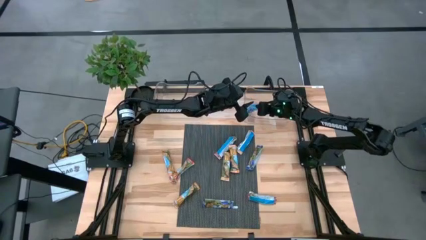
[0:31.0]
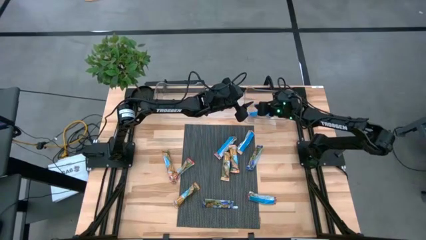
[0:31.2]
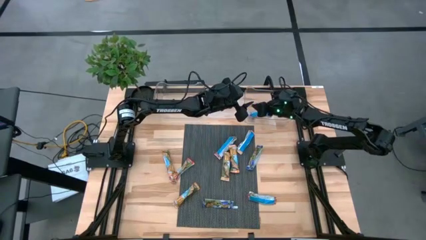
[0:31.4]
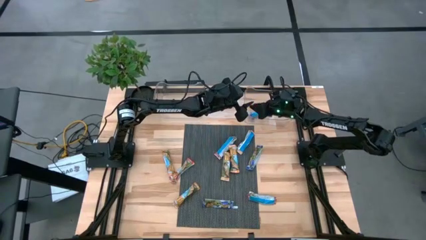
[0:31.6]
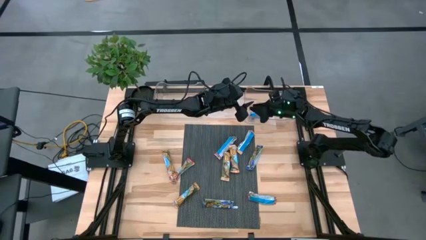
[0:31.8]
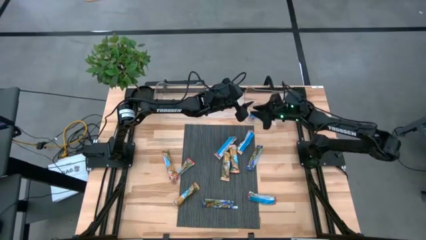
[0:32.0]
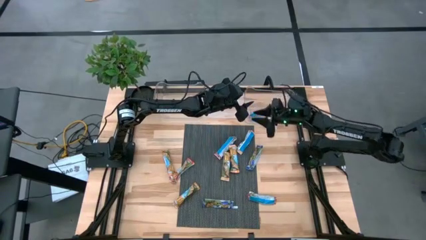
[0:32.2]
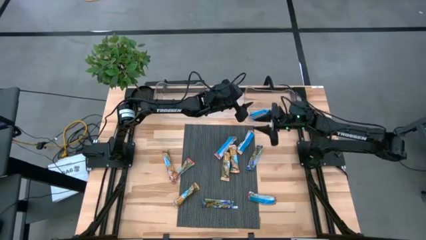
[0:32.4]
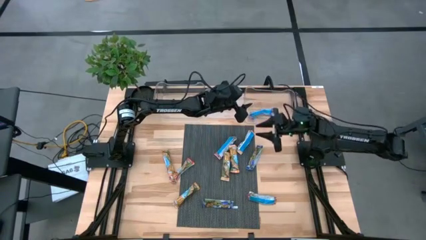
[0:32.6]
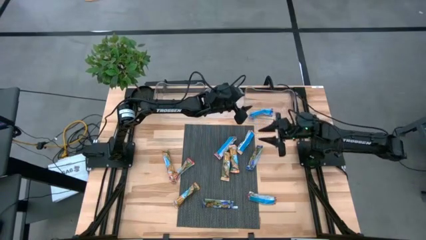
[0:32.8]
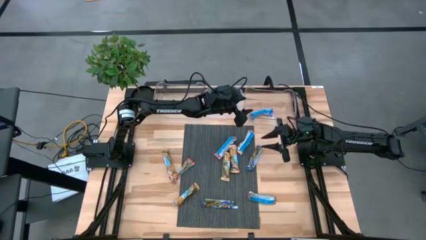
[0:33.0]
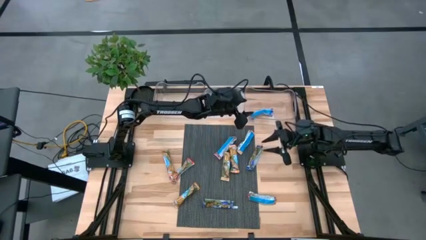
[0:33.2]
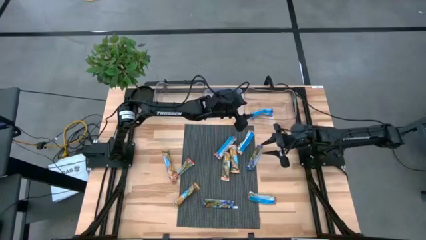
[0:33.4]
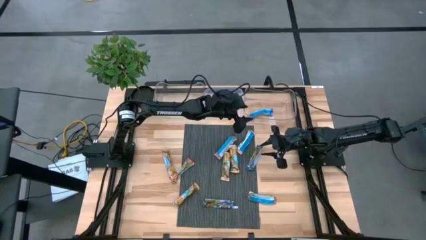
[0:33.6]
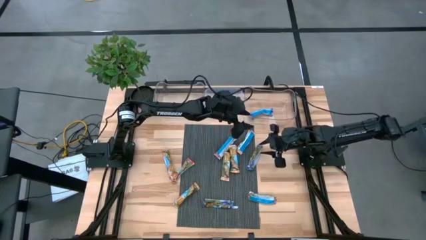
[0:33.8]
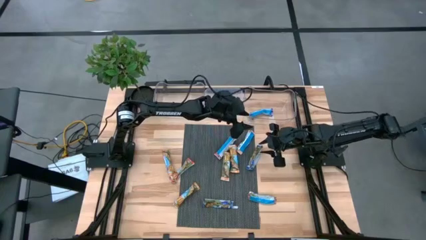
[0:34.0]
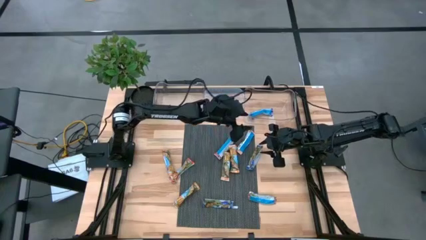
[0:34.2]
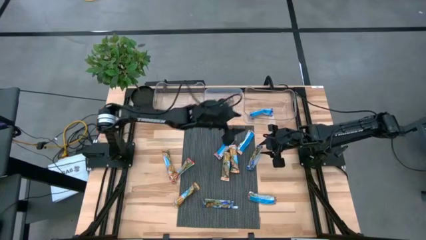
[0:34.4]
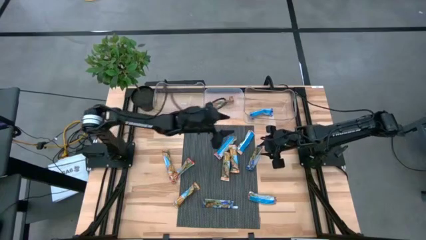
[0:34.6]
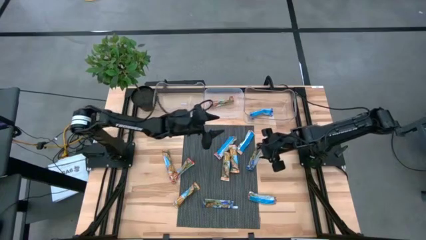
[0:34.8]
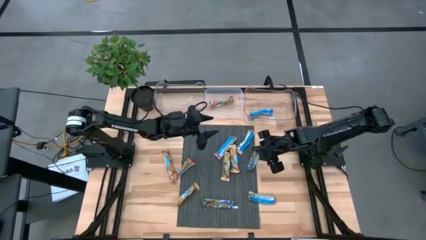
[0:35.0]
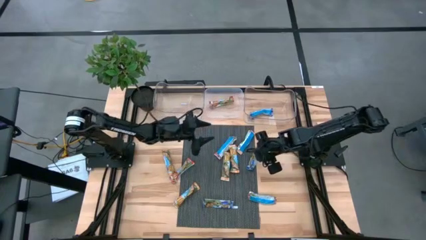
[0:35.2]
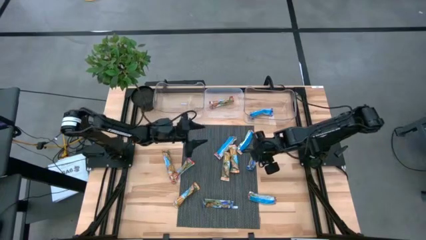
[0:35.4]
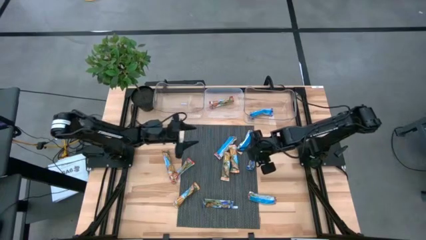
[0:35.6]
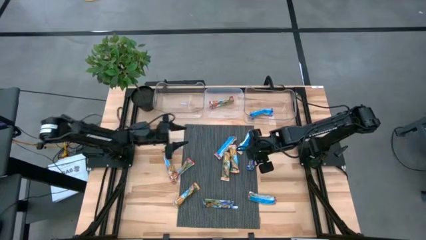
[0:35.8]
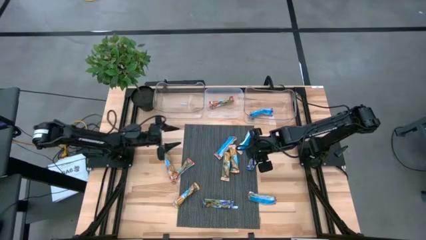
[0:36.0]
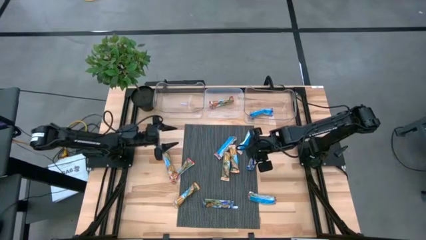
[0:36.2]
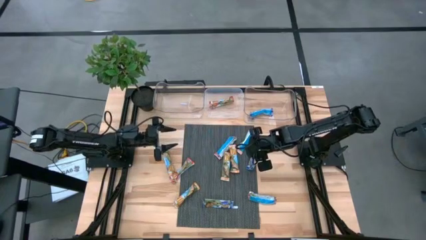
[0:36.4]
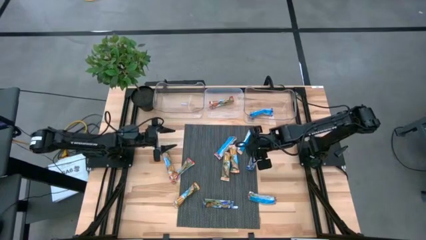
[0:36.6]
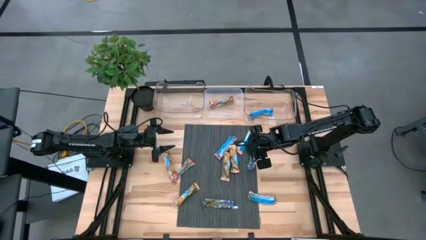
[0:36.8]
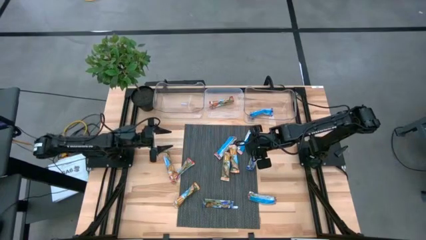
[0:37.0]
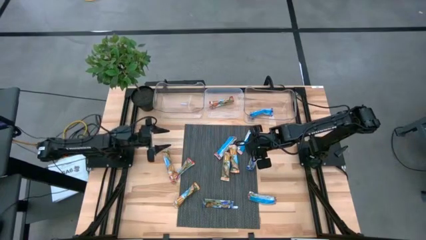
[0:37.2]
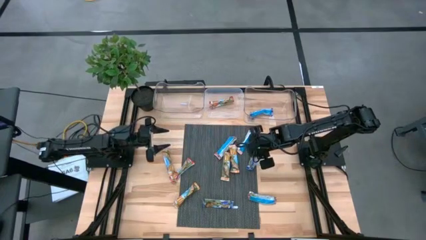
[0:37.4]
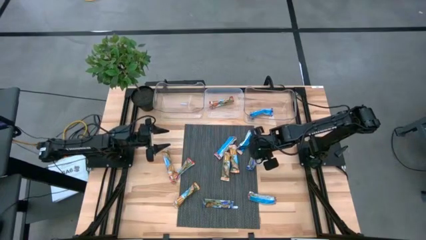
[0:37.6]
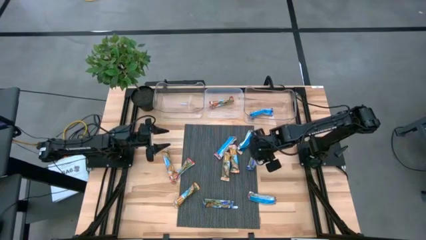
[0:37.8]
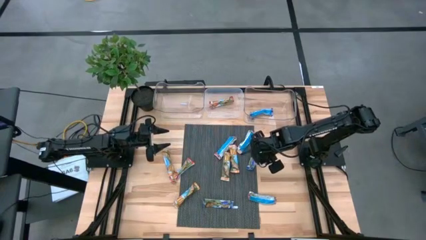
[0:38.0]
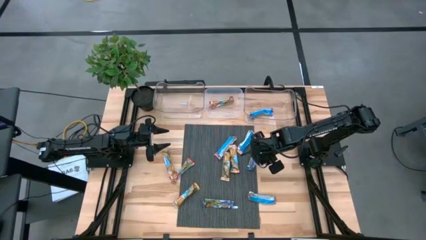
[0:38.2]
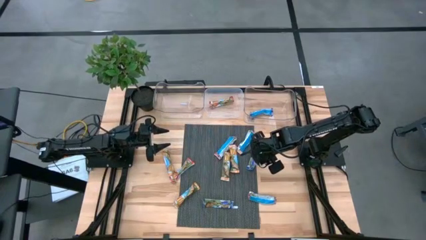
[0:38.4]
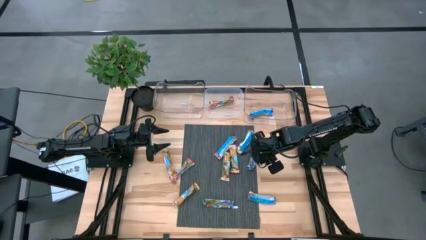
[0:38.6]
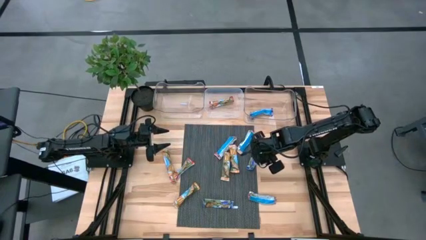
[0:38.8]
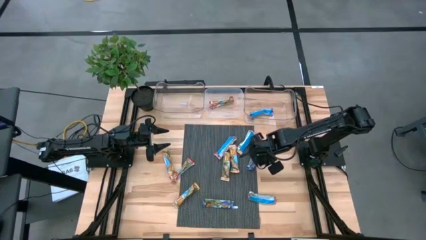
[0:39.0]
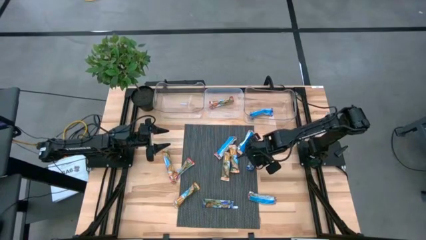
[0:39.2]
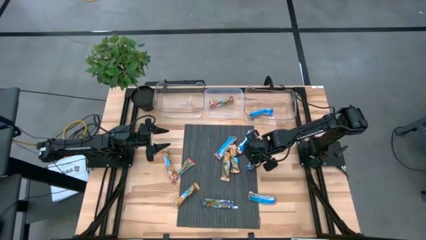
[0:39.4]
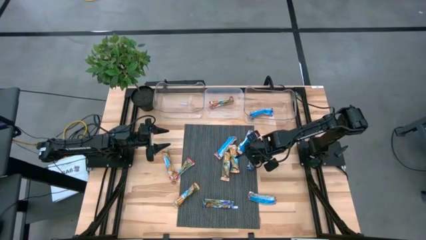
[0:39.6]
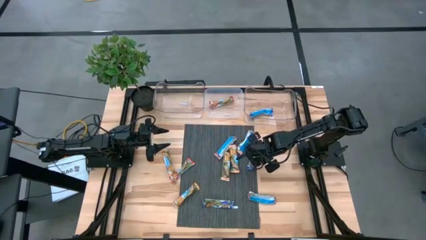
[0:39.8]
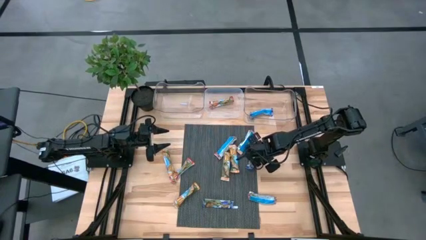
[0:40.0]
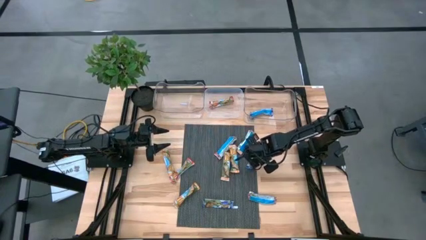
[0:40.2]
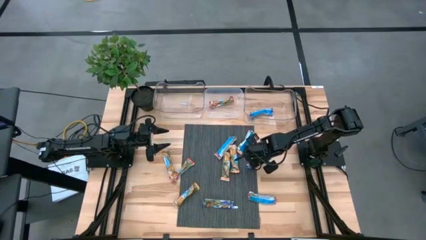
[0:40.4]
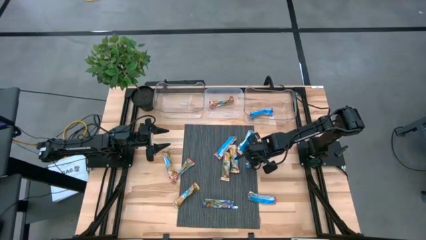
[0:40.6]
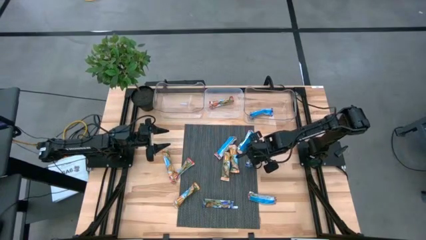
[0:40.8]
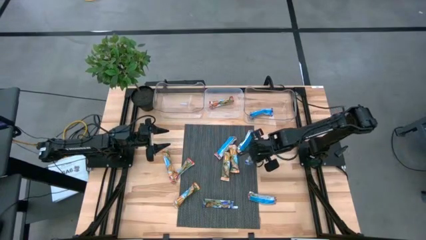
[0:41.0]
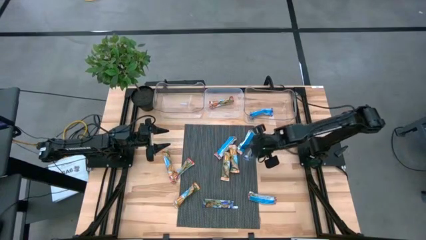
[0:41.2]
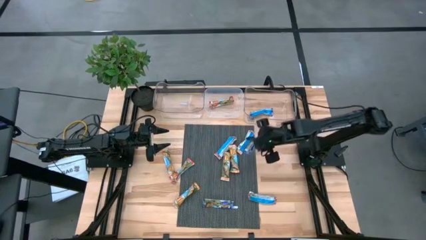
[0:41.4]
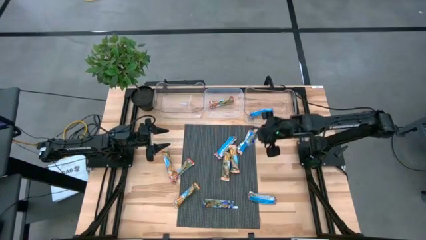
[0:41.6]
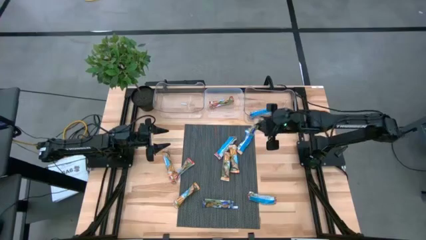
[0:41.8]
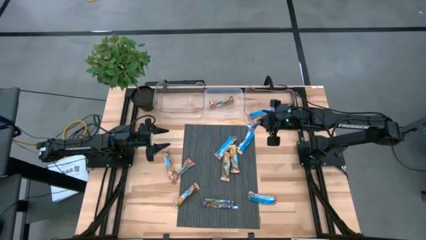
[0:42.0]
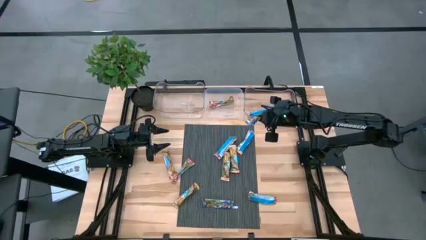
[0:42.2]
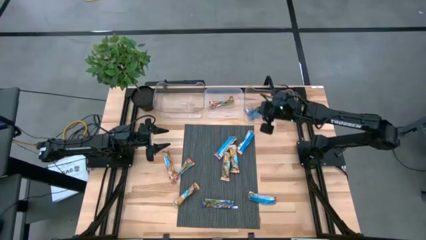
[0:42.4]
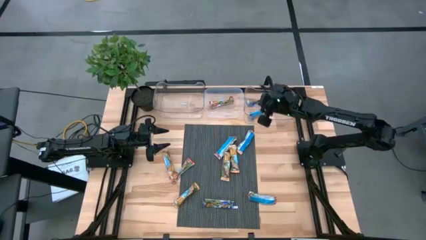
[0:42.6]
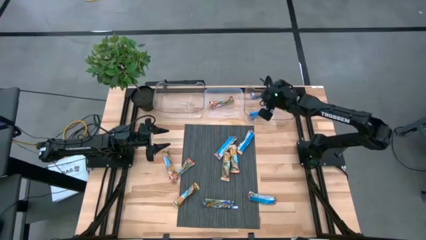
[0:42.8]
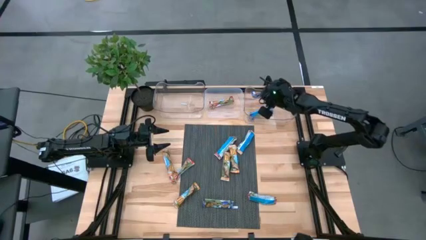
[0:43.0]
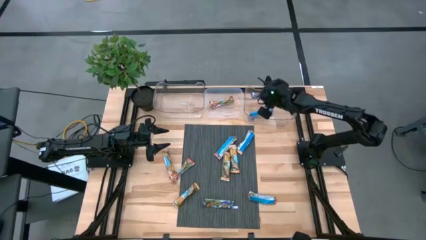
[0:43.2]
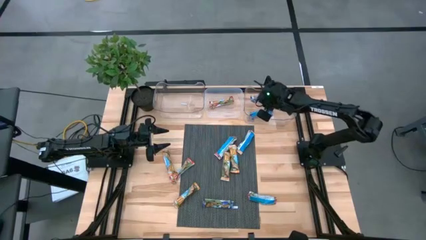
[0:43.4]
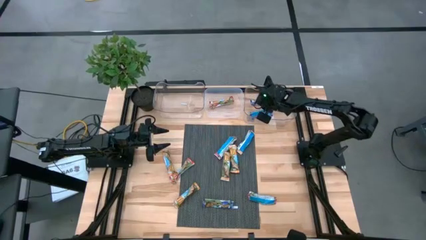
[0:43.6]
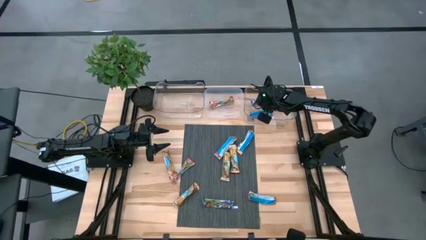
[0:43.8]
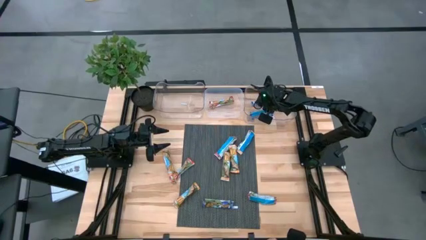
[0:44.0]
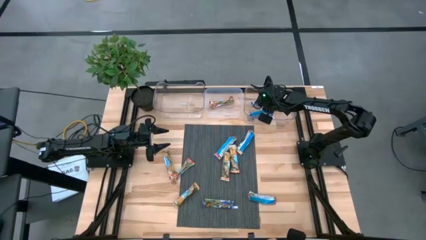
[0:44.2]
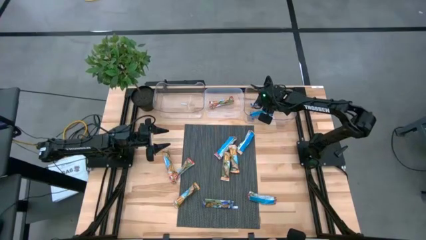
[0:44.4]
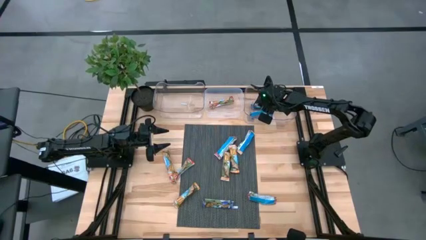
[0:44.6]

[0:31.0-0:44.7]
Task: Pick and place Granola Bars by type
Put the top blue granola bar into the right transparent bin

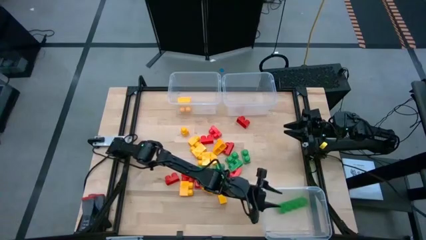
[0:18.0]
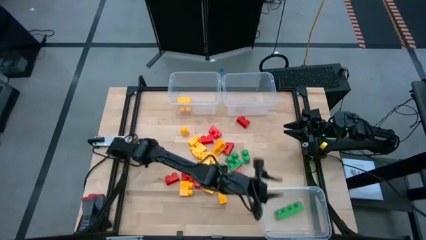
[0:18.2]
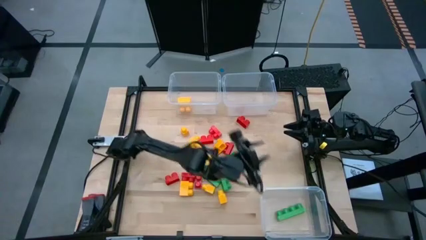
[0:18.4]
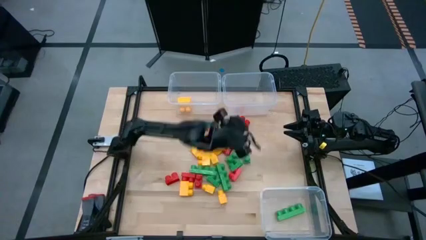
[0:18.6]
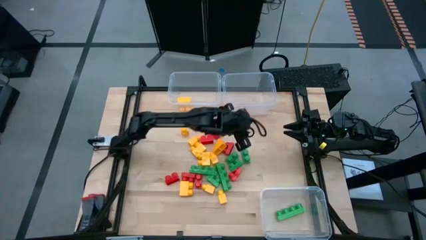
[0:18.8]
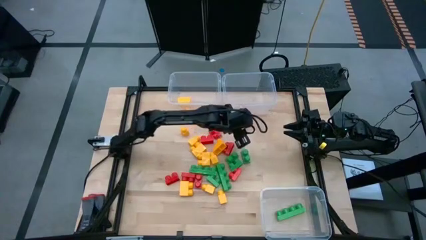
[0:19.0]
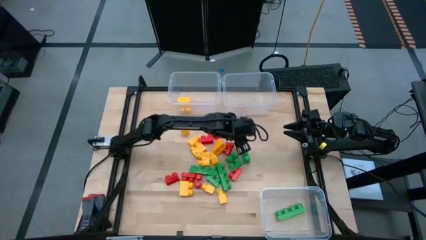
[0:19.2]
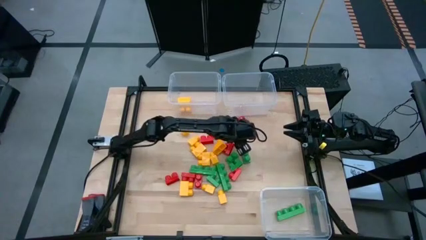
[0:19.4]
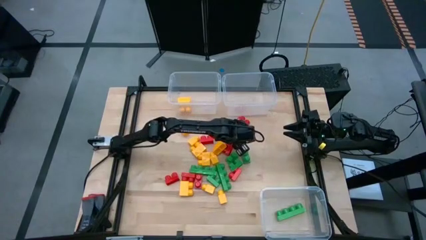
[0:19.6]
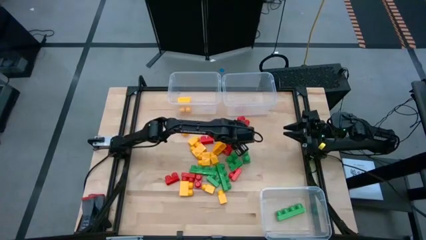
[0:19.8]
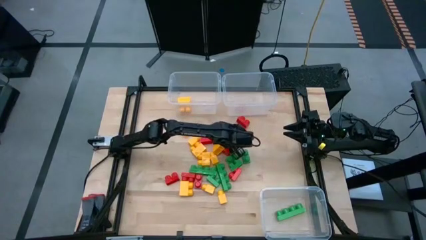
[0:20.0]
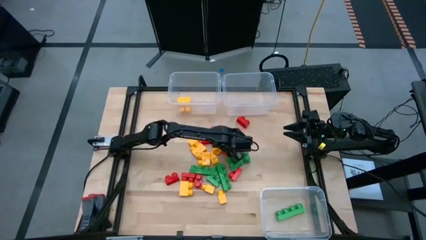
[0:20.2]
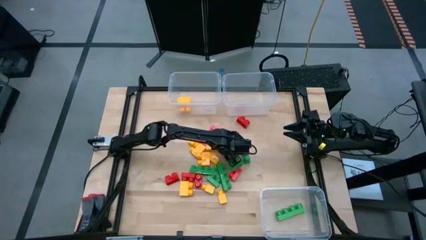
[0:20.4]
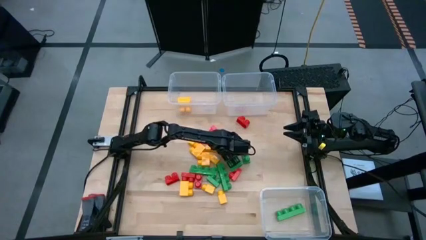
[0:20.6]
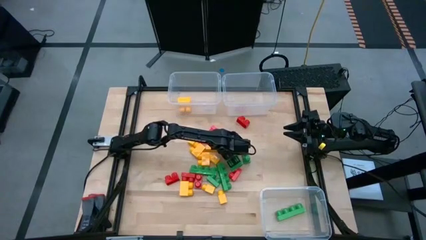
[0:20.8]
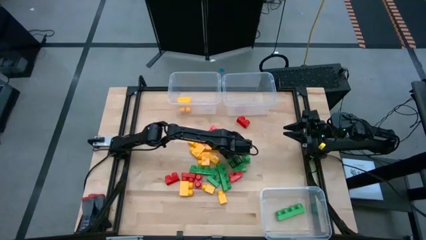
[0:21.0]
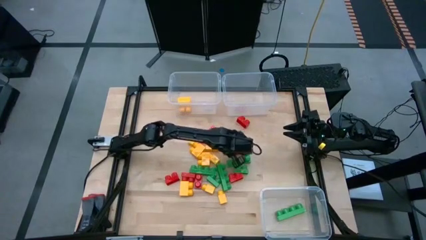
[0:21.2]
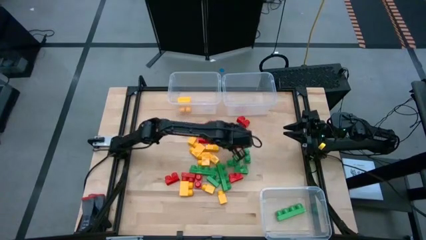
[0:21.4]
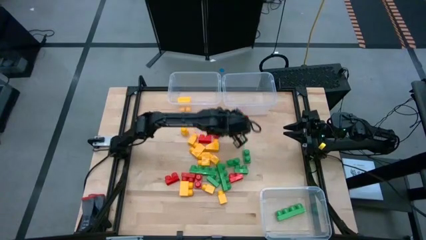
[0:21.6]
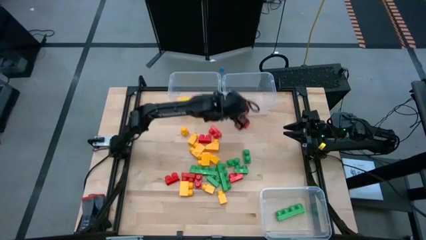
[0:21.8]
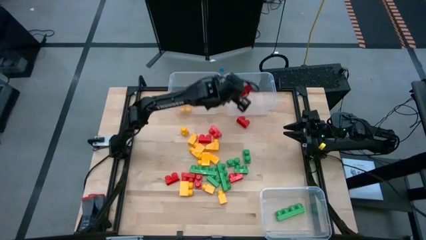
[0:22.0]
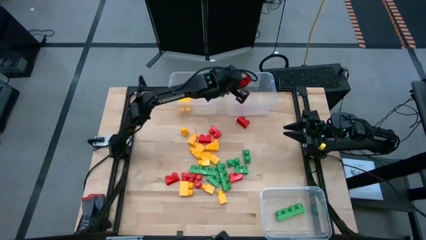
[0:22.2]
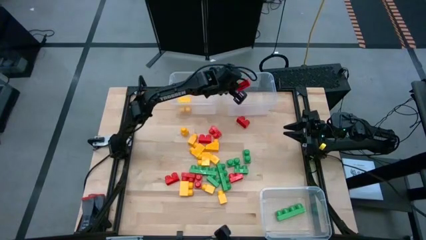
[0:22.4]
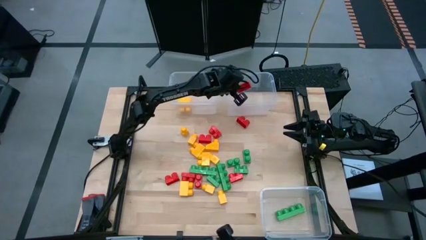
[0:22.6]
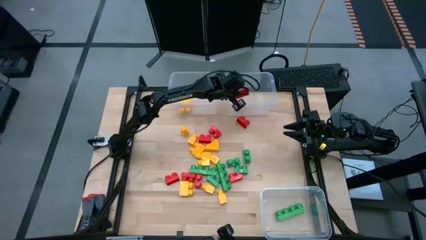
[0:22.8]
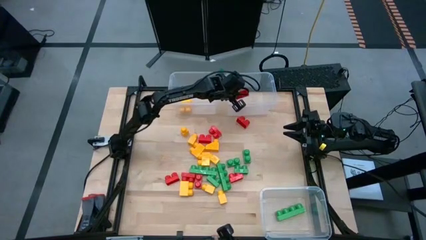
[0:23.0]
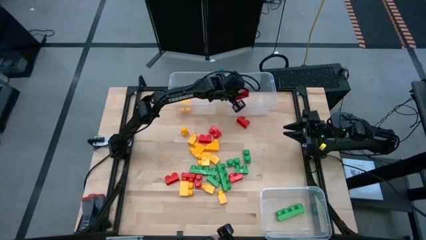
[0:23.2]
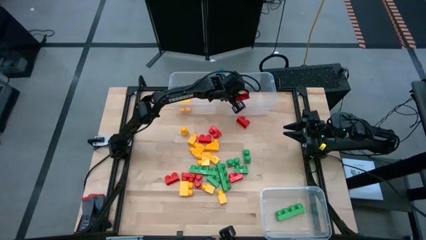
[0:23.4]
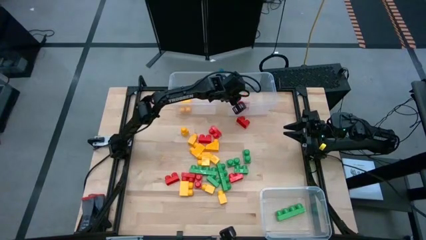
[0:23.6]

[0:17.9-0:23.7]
Task: Sort blocks
Put the red game piece into the top right transparent bin
